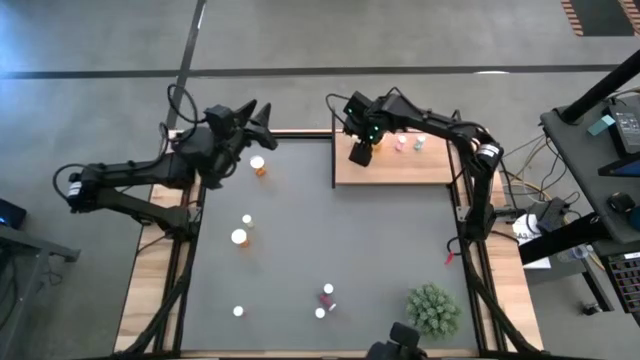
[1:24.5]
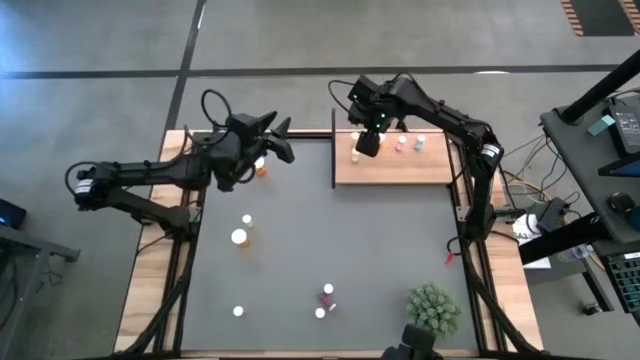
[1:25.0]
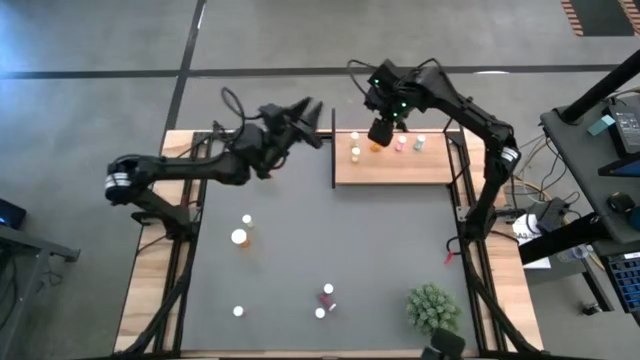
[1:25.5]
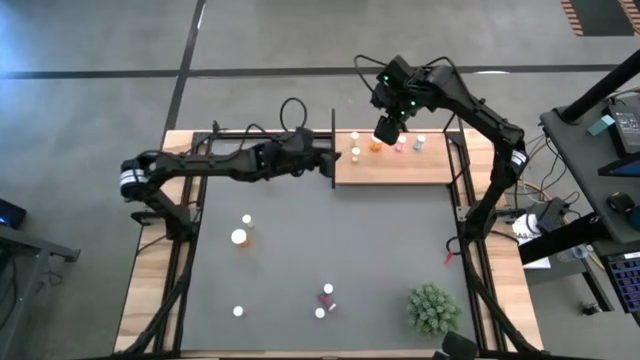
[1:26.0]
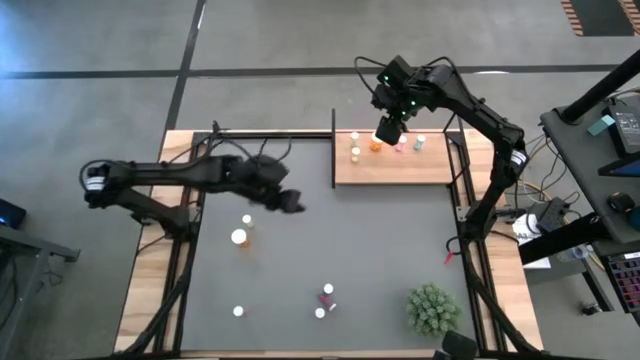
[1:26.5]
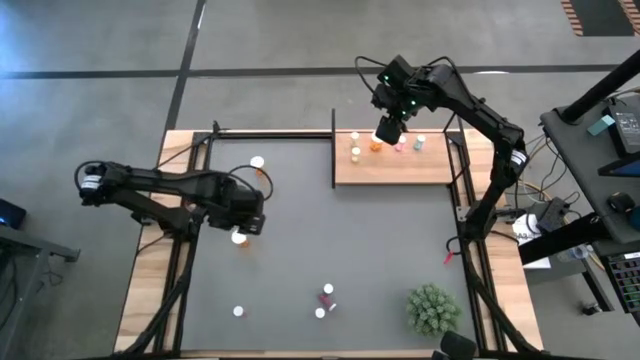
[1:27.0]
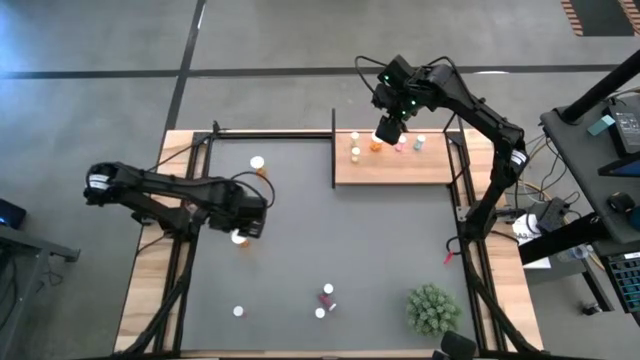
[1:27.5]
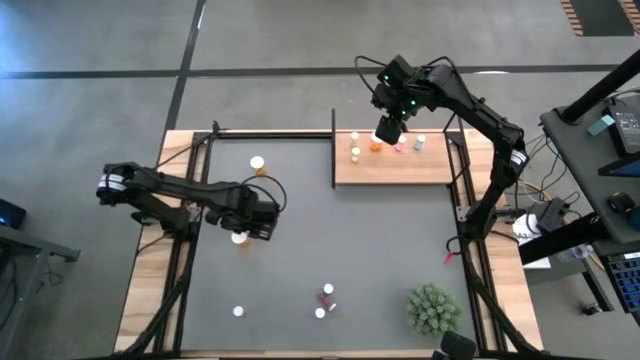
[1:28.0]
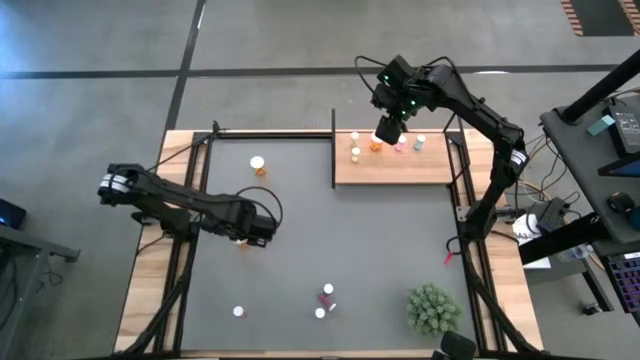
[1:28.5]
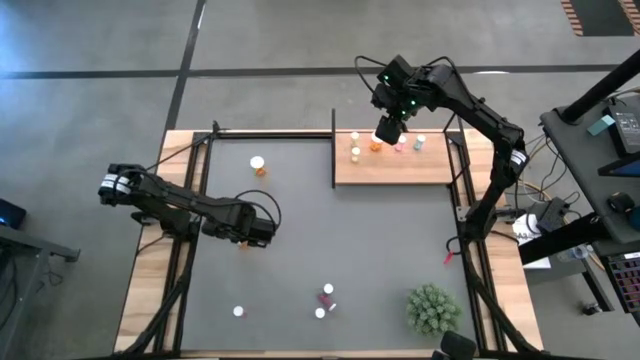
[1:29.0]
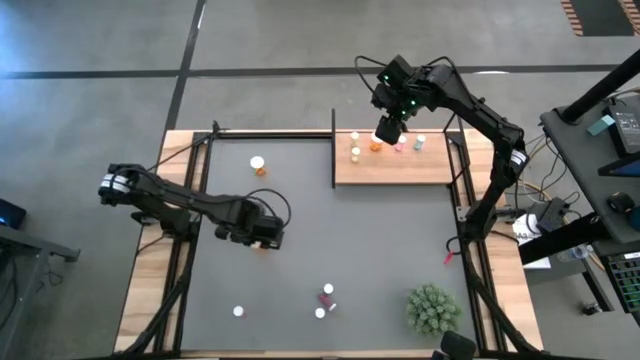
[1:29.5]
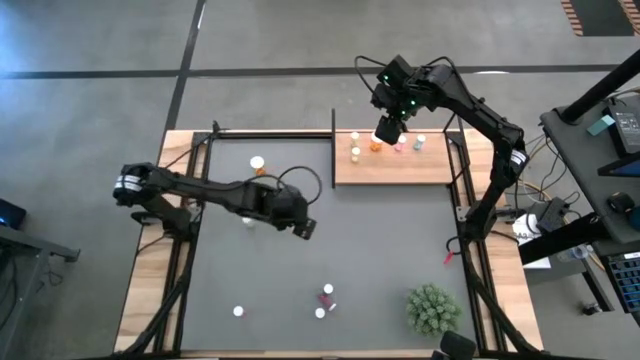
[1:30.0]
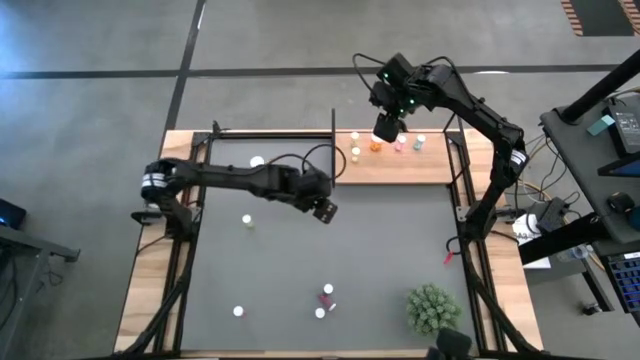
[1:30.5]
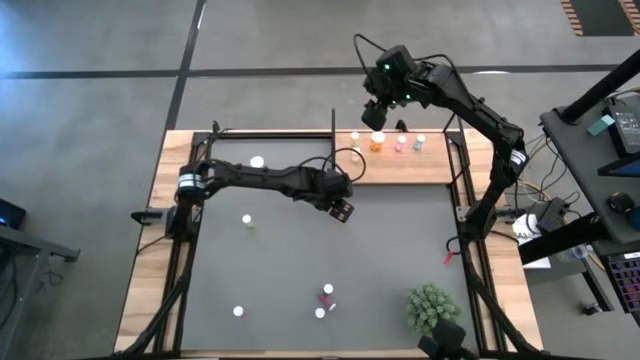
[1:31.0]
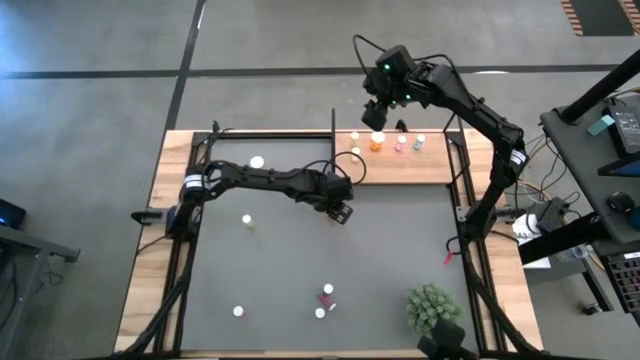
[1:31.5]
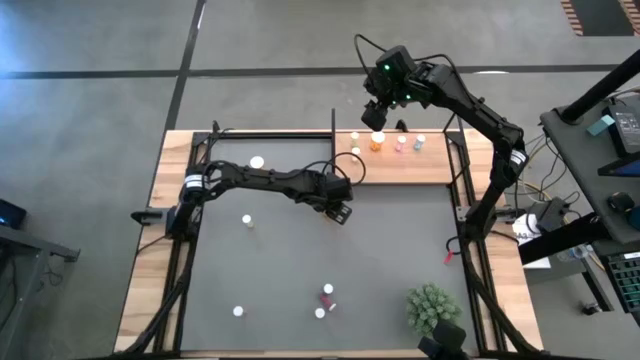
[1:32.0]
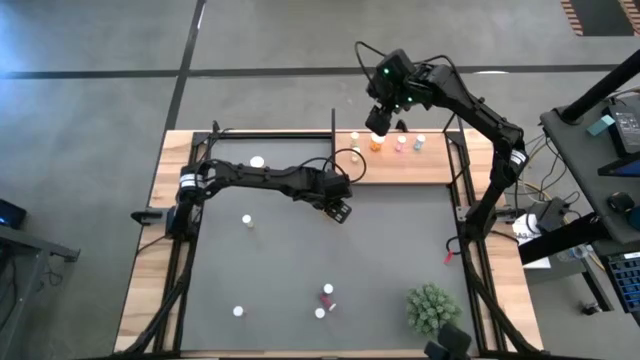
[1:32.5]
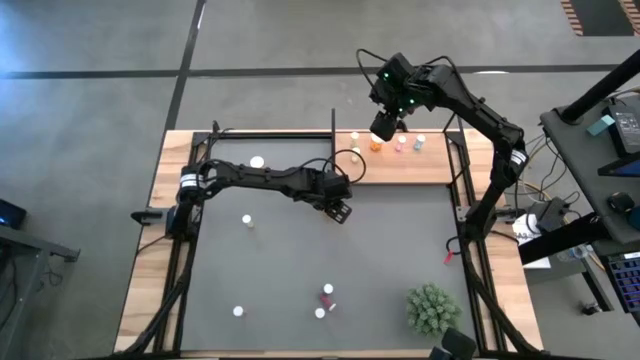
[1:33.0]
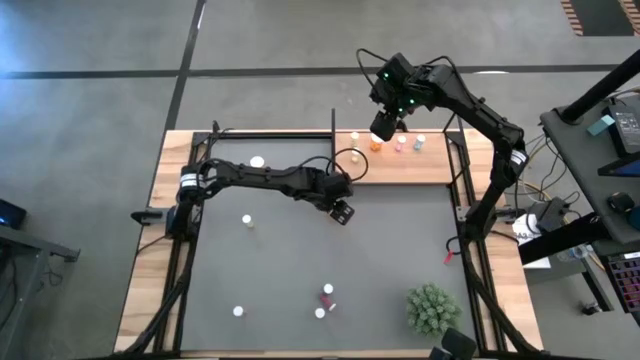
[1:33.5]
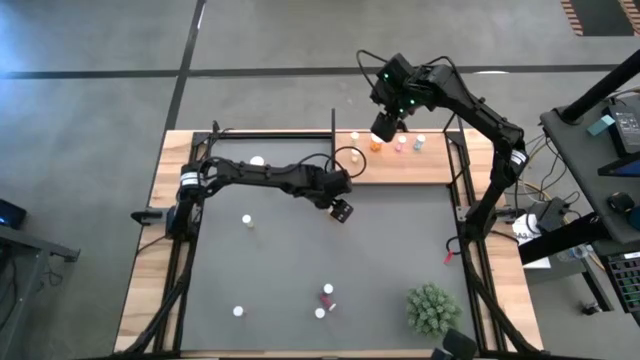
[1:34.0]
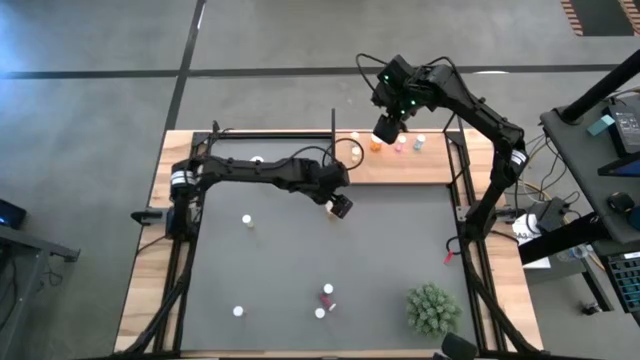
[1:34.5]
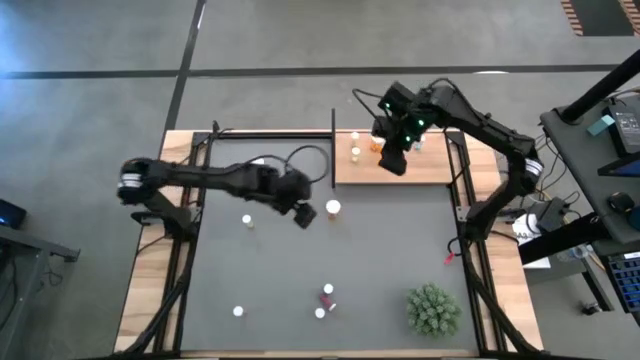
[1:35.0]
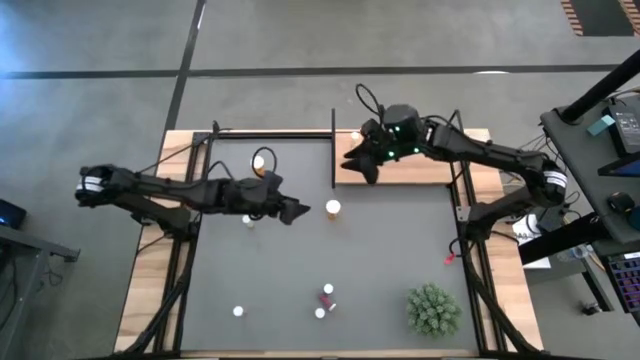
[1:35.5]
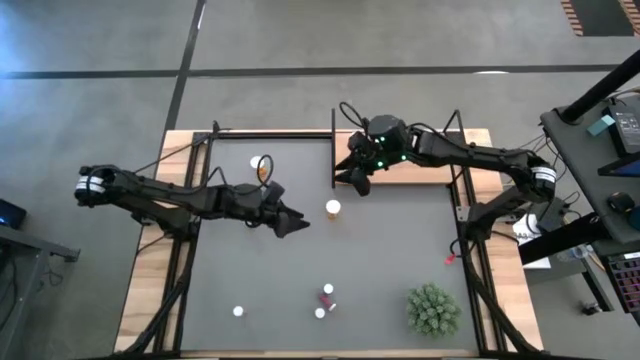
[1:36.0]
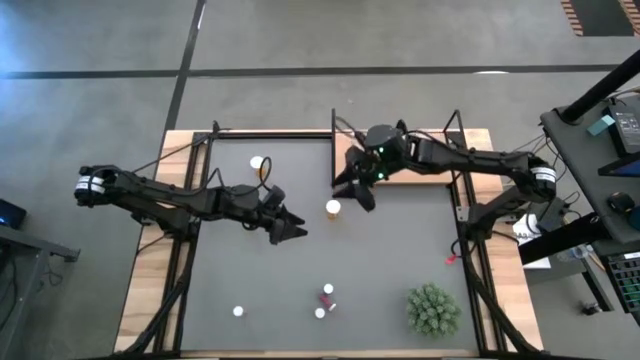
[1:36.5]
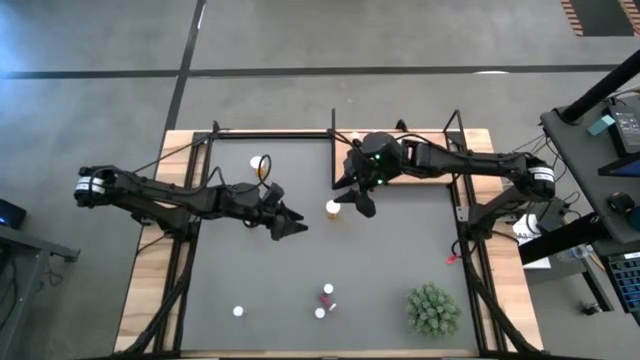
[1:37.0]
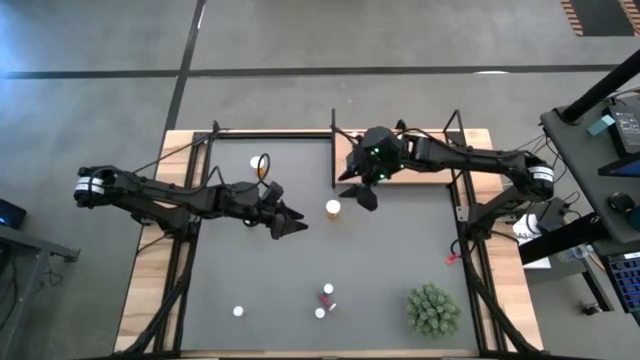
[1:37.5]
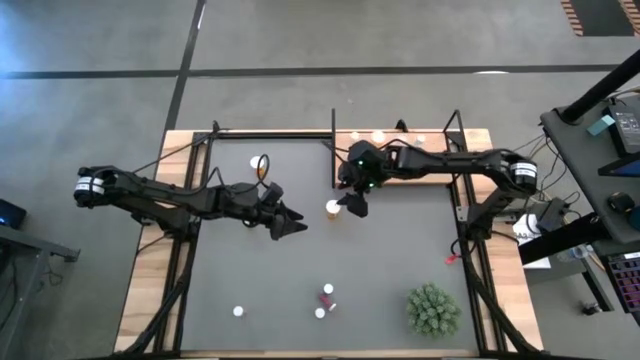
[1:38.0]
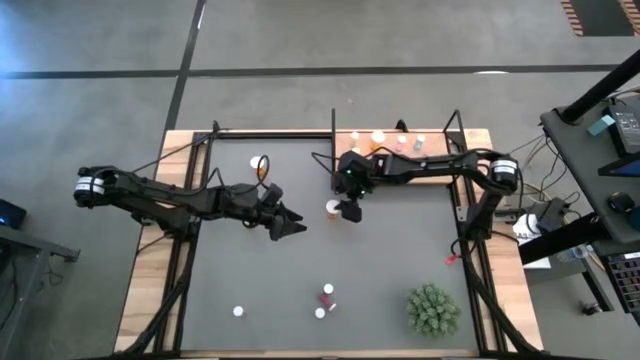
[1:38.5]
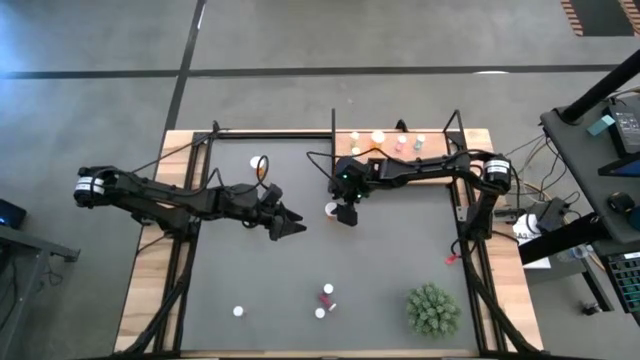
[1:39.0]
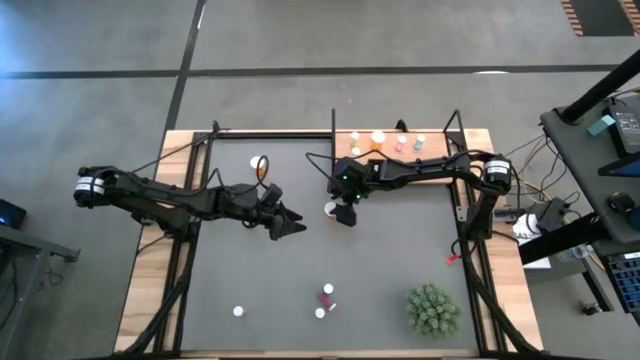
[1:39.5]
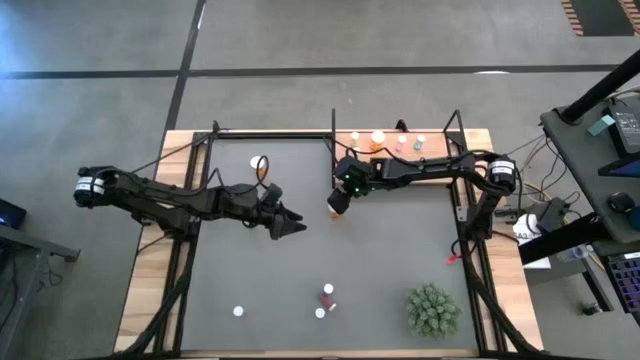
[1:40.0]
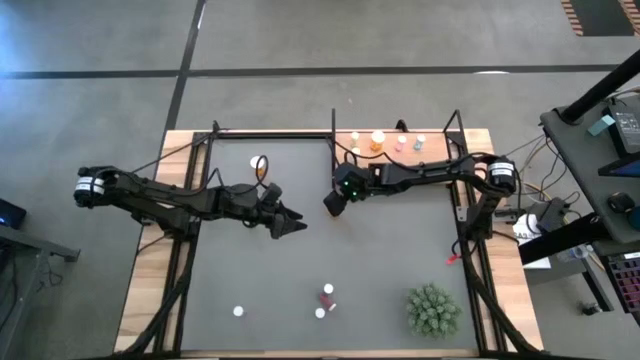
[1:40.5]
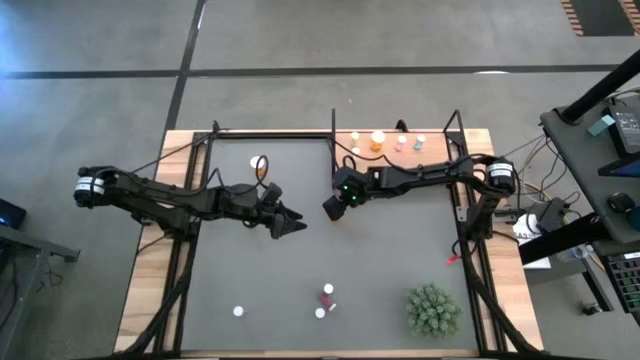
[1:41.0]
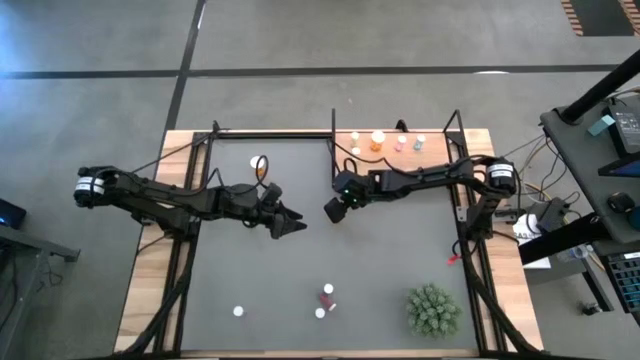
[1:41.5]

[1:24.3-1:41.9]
Task: Pick and place medicine bottles onto shelf by color
Put the bottom orange medicine bottle on the shelf aligned with the other orange medicine bottle

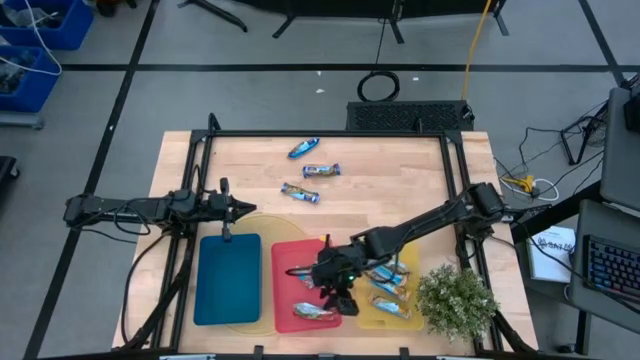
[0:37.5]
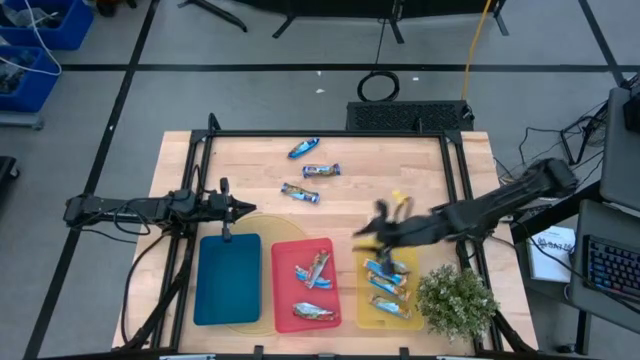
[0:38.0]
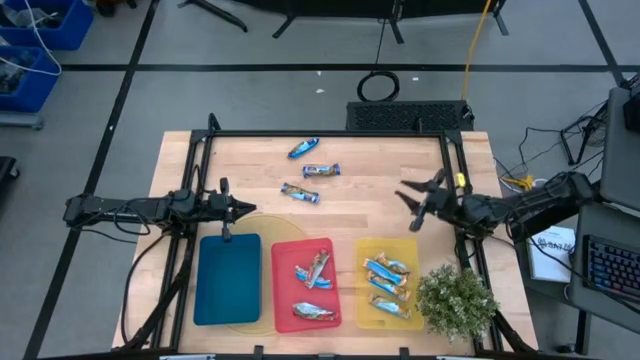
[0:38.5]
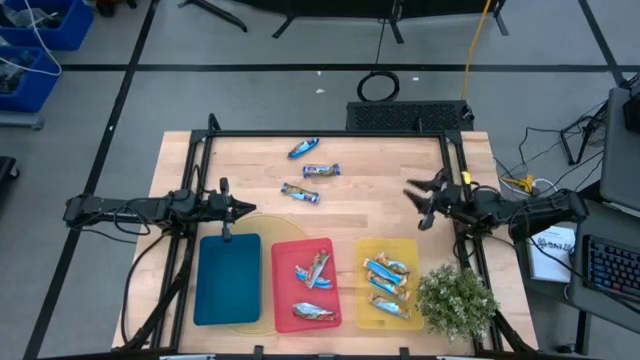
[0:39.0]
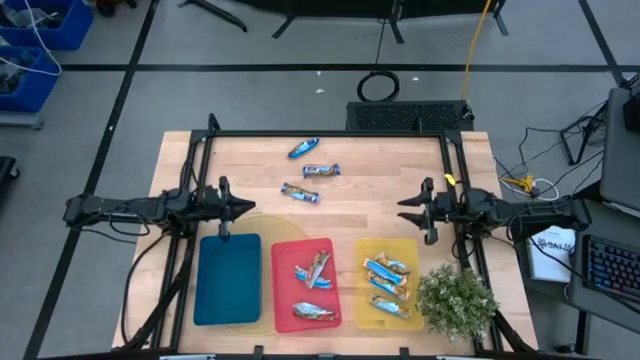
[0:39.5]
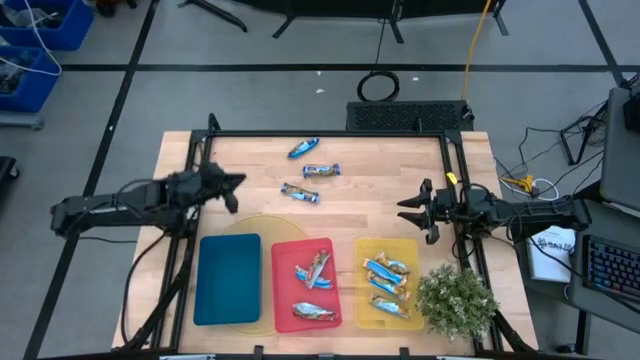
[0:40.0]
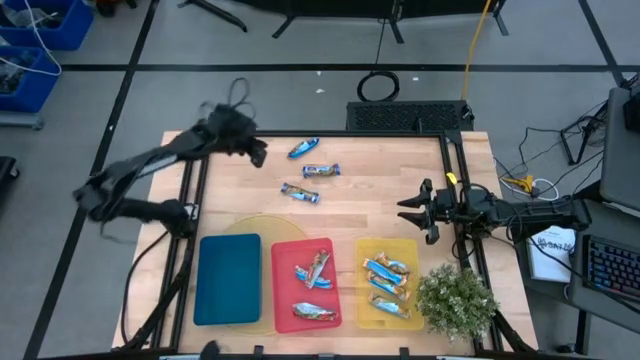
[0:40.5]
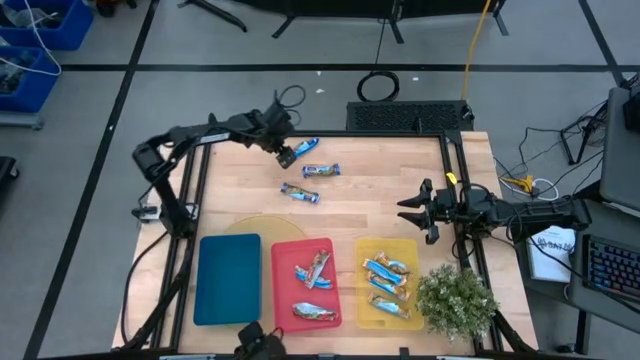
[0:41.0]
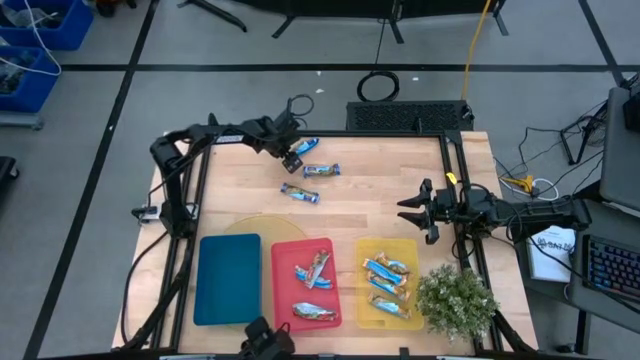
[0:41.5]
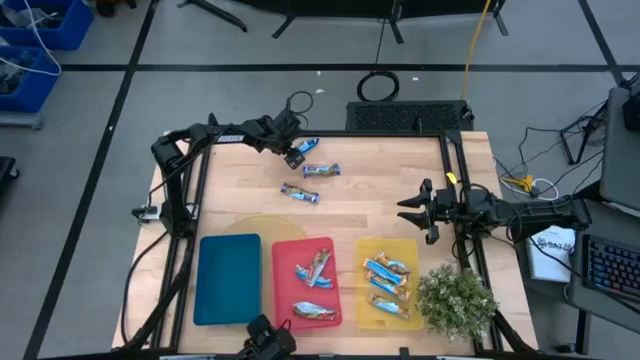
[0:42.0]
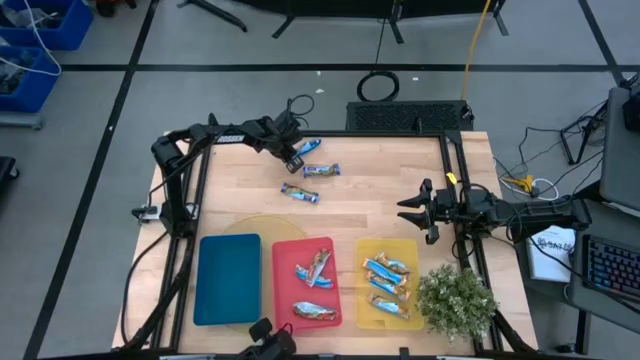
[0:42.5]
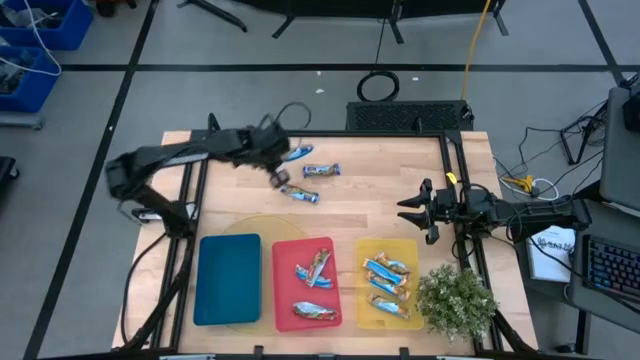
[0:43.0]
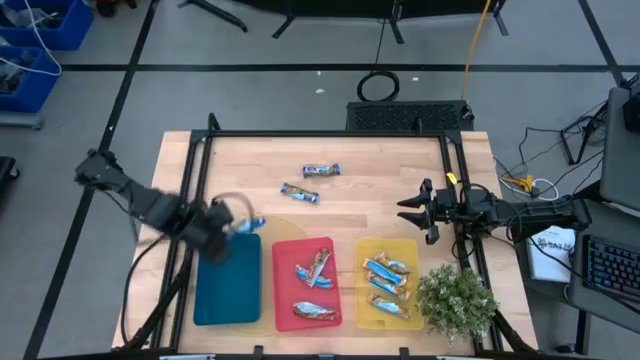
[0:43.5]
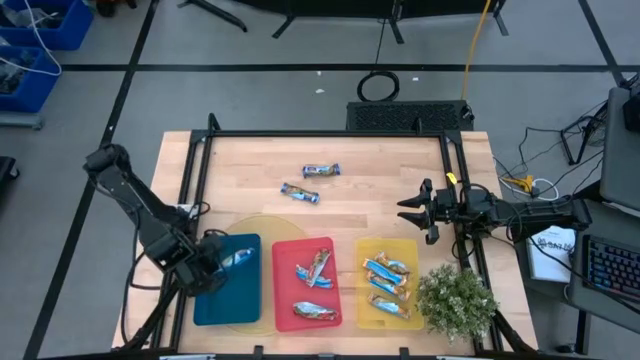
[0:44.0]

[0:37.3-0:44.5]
Task: Pick and place Granola Bars by type
Put the top blue granola bar into the blue bin
